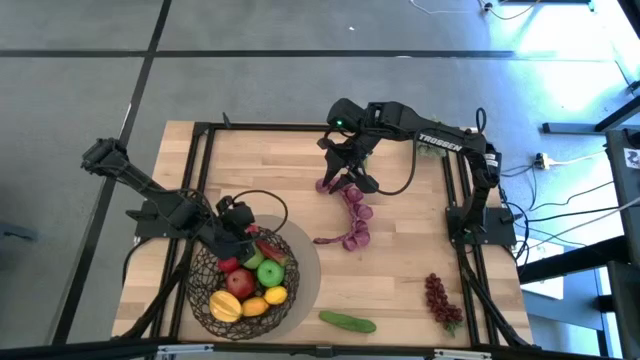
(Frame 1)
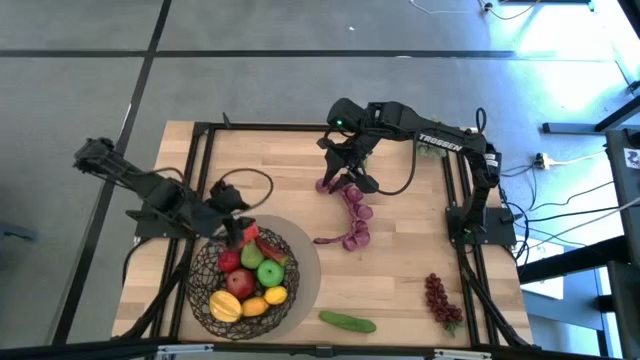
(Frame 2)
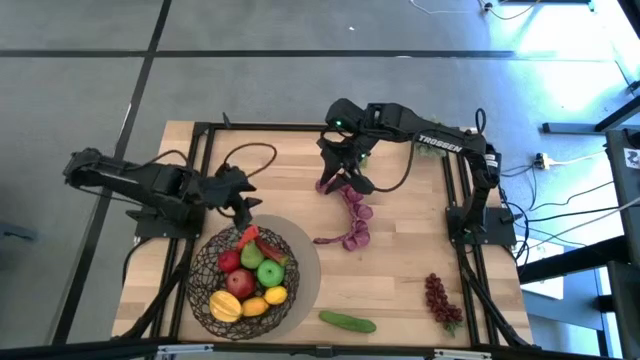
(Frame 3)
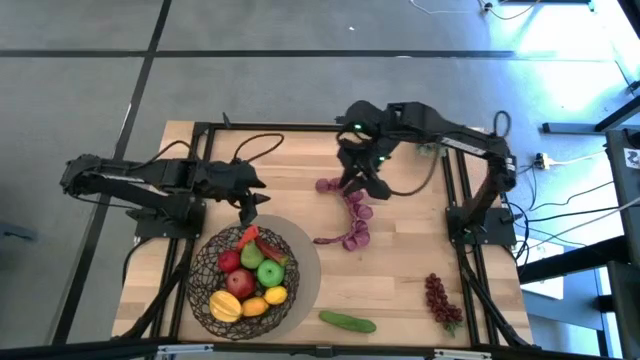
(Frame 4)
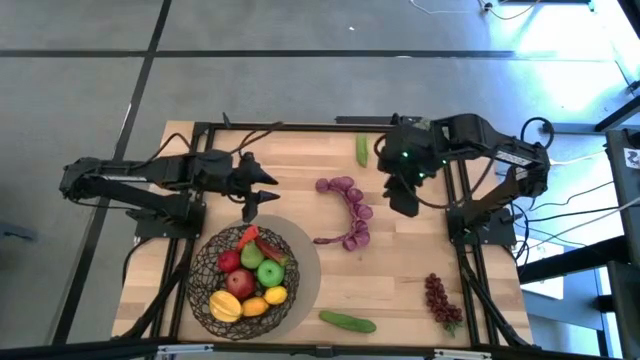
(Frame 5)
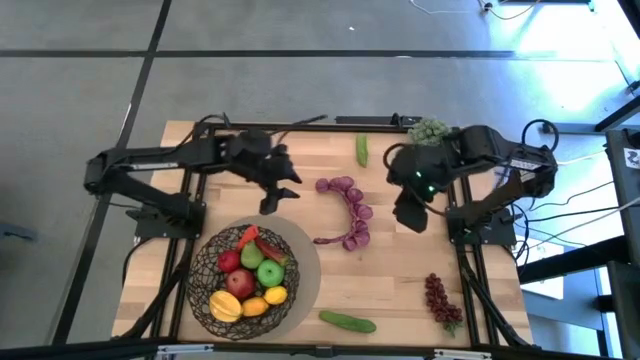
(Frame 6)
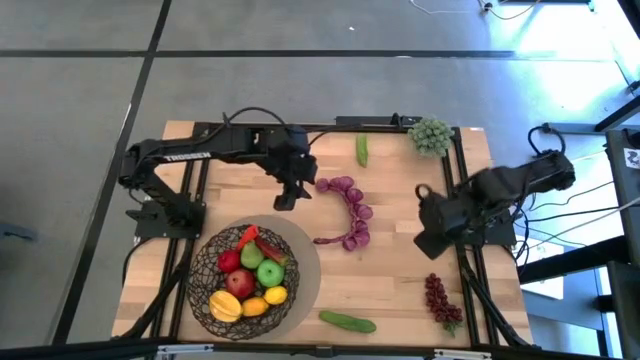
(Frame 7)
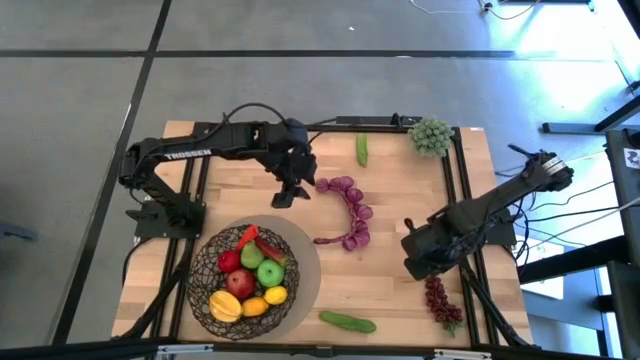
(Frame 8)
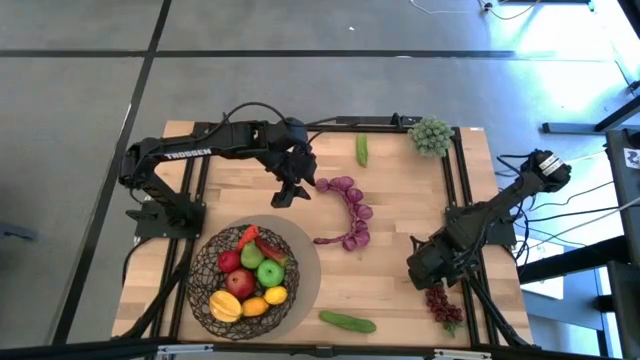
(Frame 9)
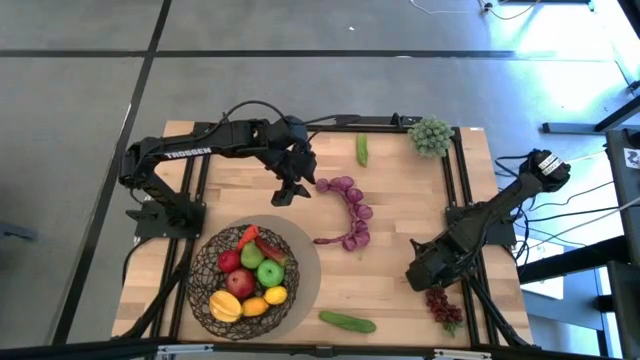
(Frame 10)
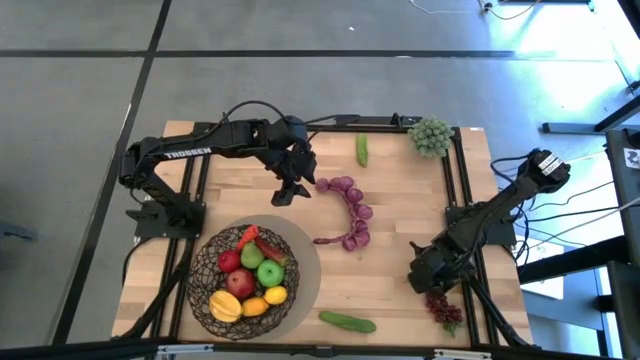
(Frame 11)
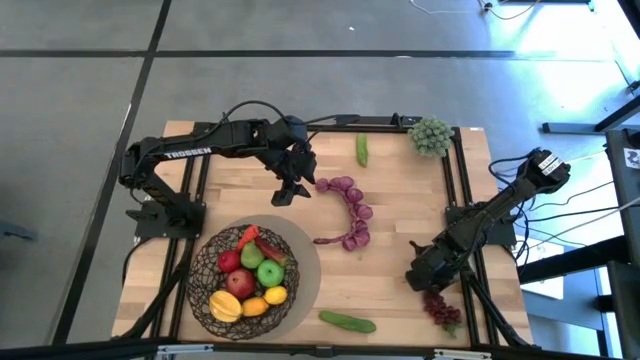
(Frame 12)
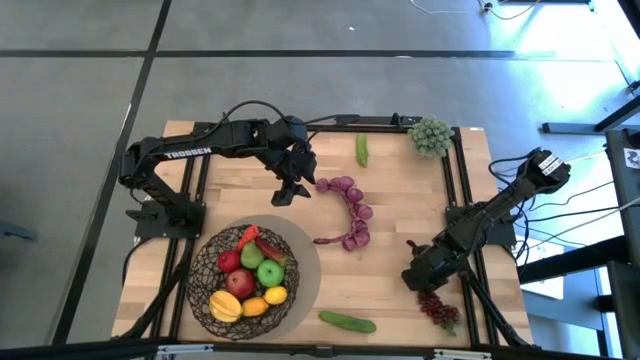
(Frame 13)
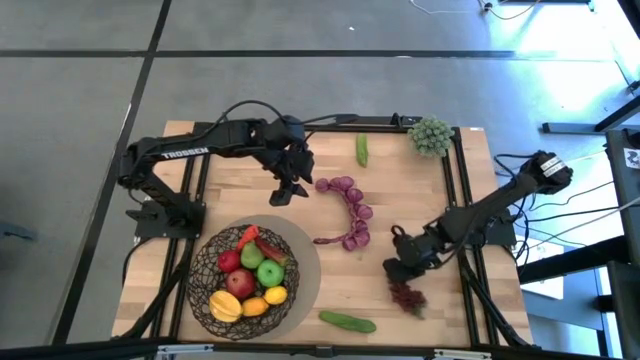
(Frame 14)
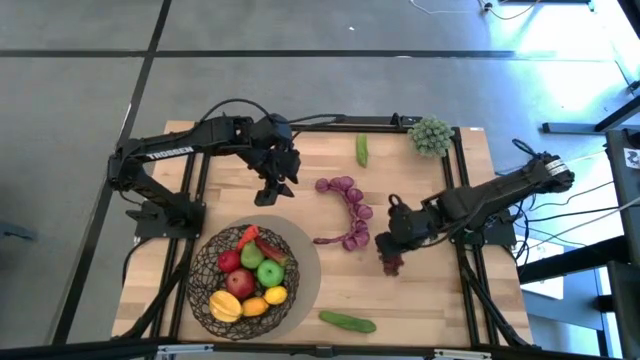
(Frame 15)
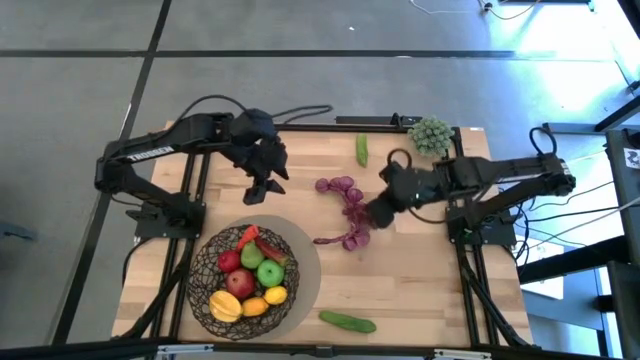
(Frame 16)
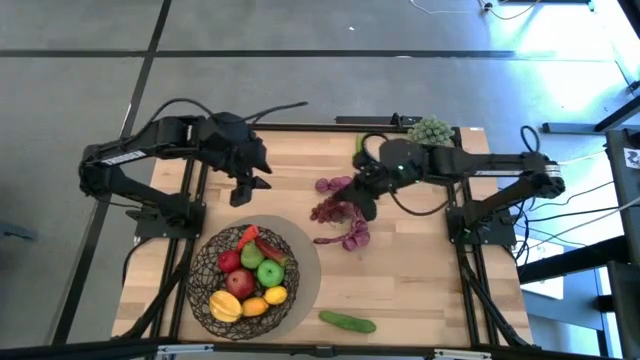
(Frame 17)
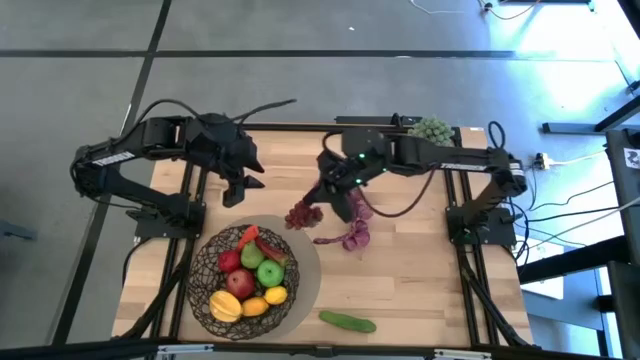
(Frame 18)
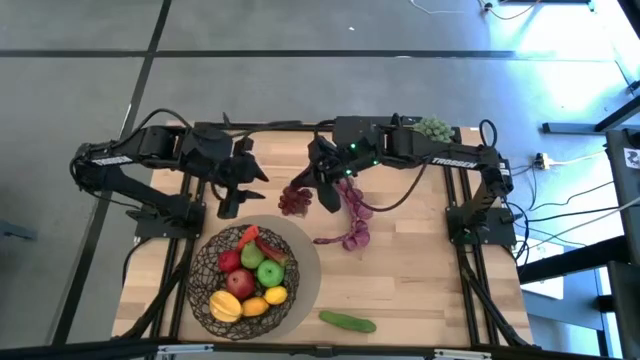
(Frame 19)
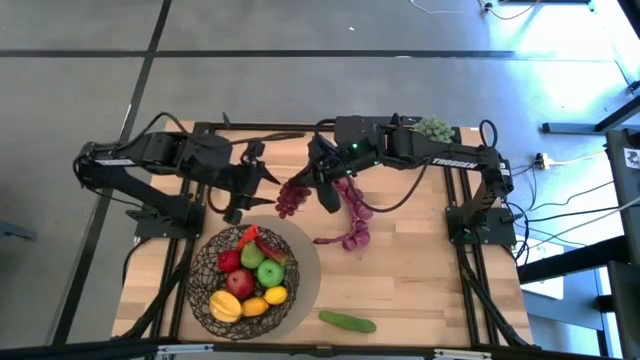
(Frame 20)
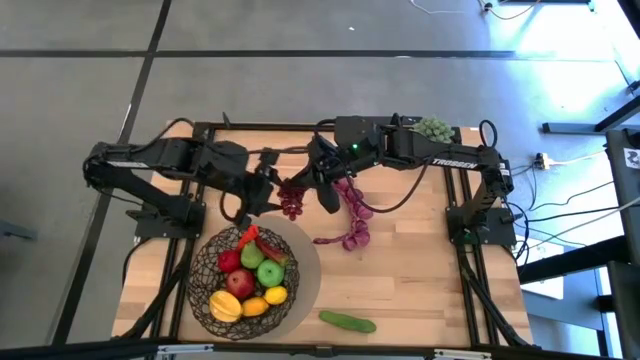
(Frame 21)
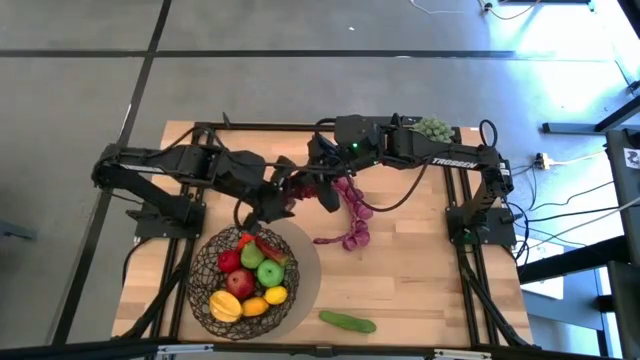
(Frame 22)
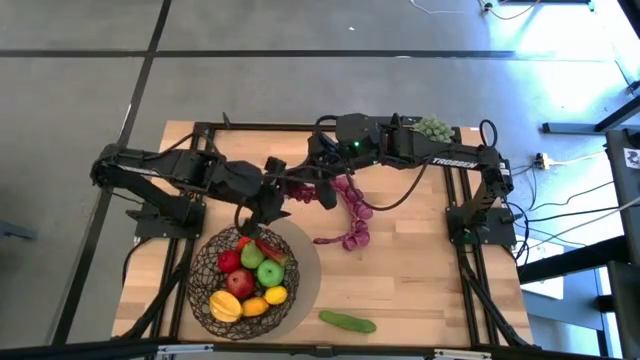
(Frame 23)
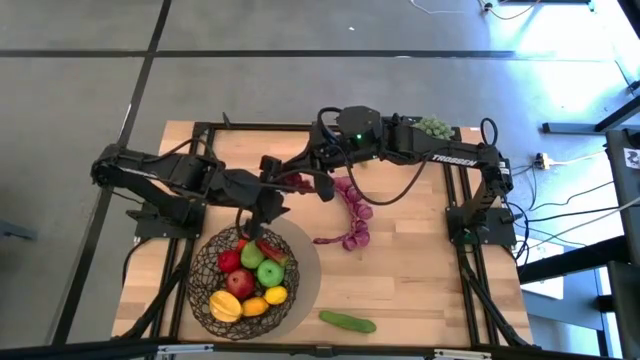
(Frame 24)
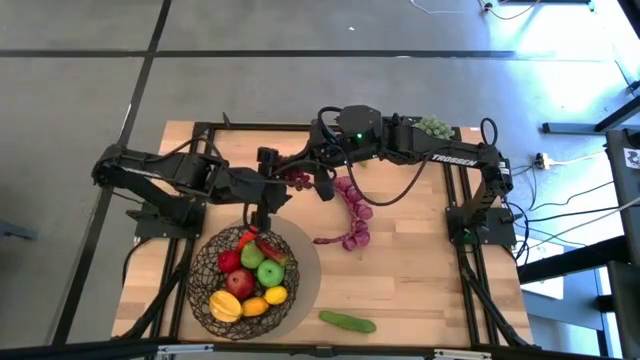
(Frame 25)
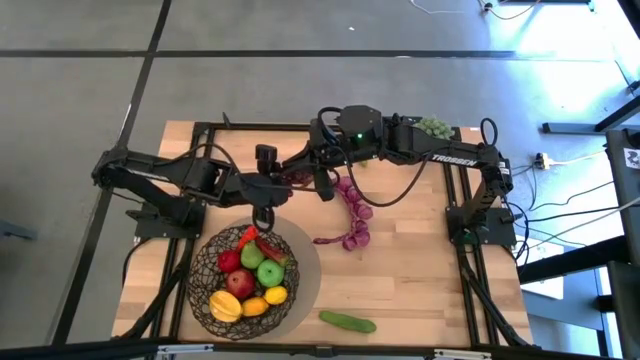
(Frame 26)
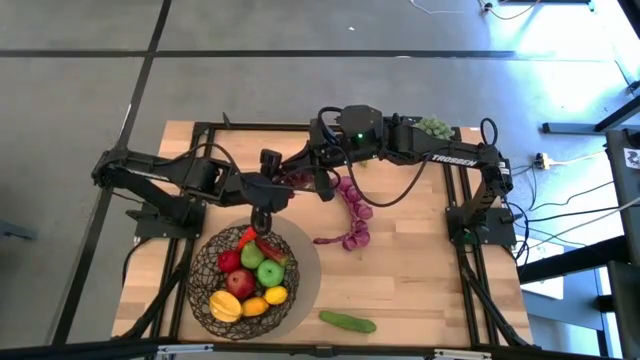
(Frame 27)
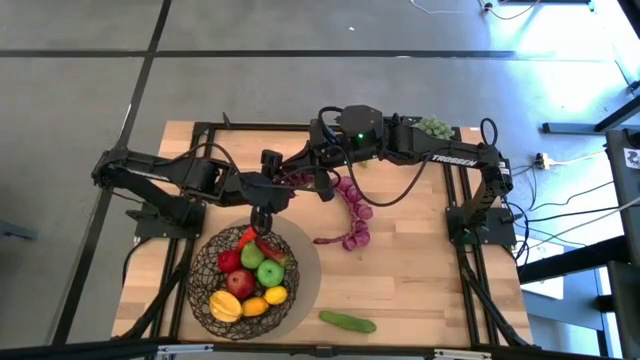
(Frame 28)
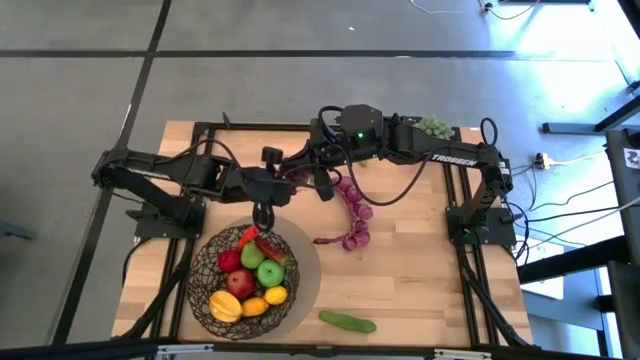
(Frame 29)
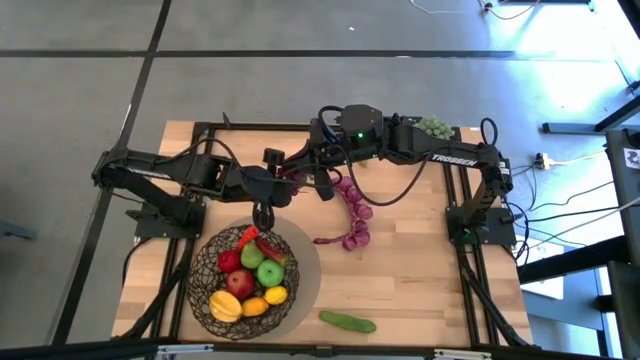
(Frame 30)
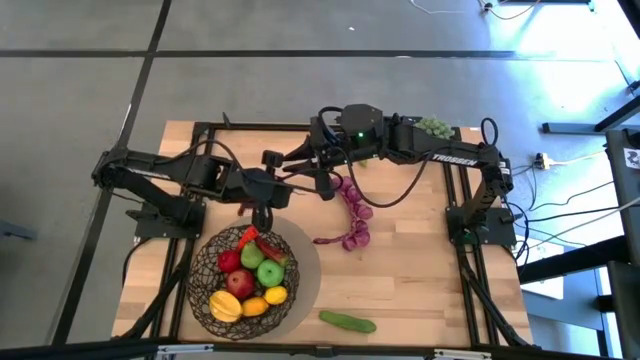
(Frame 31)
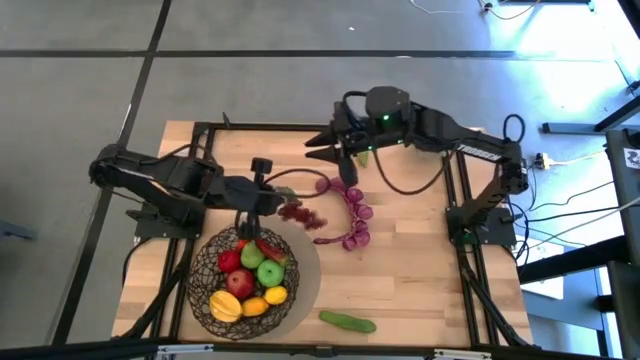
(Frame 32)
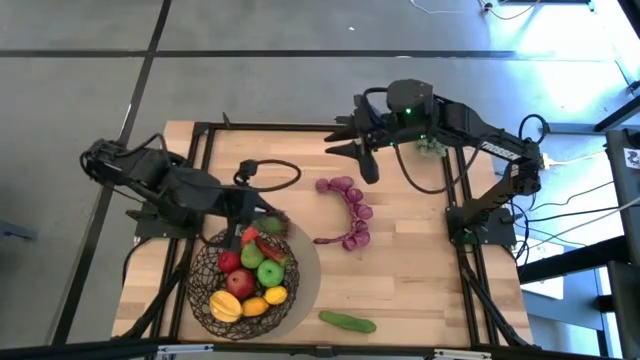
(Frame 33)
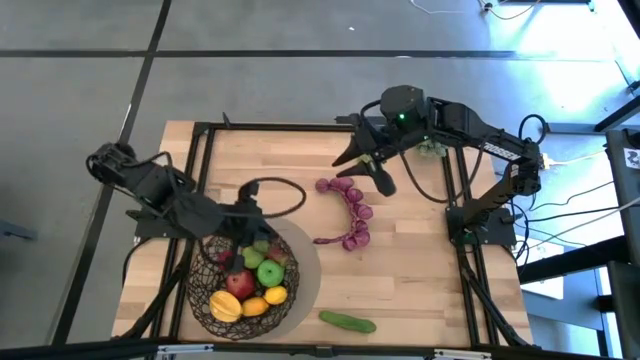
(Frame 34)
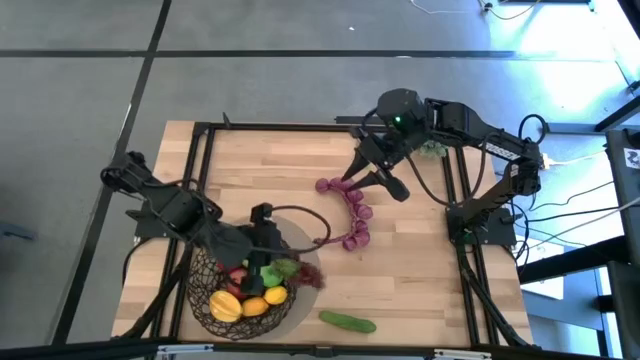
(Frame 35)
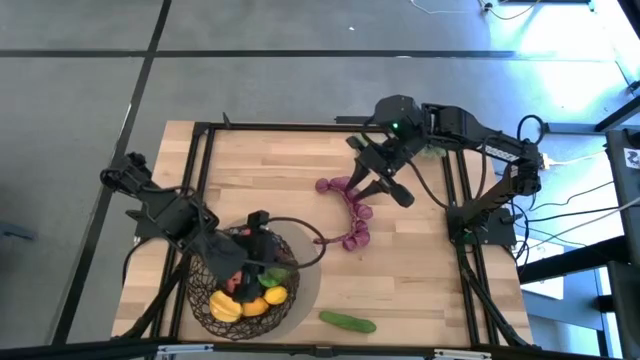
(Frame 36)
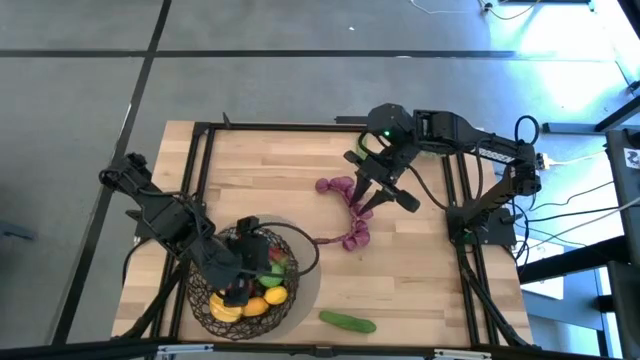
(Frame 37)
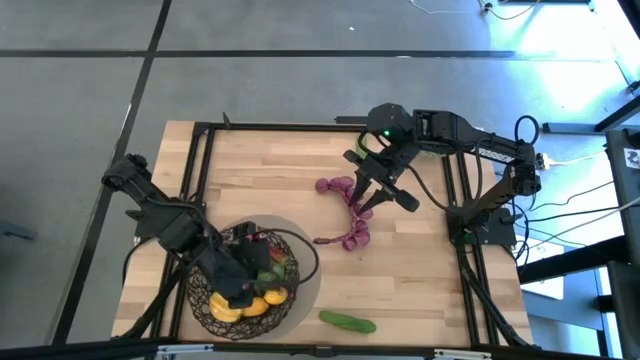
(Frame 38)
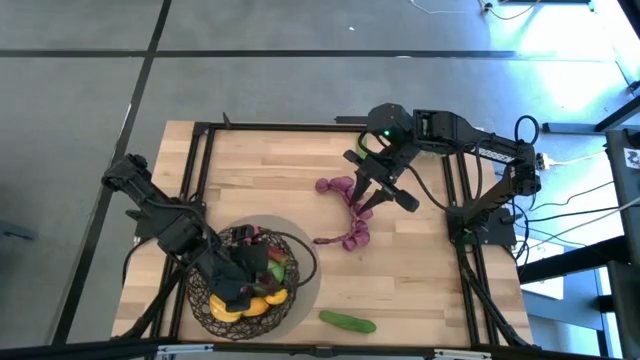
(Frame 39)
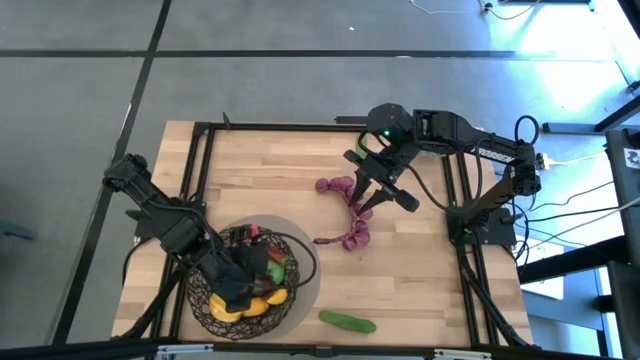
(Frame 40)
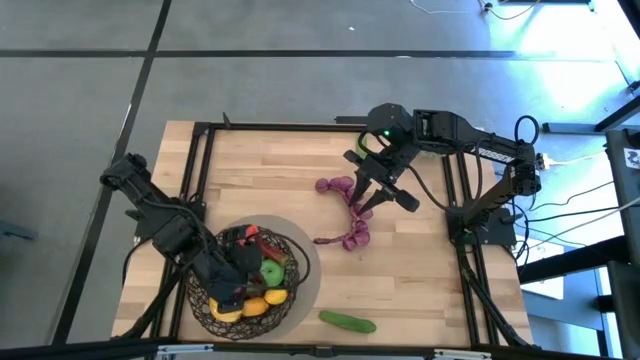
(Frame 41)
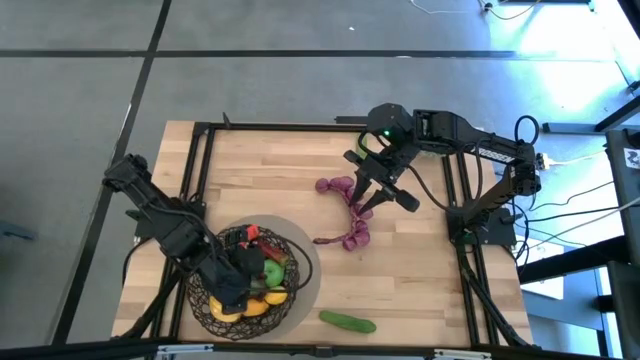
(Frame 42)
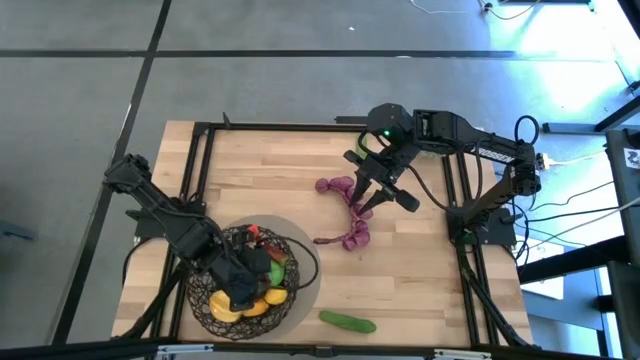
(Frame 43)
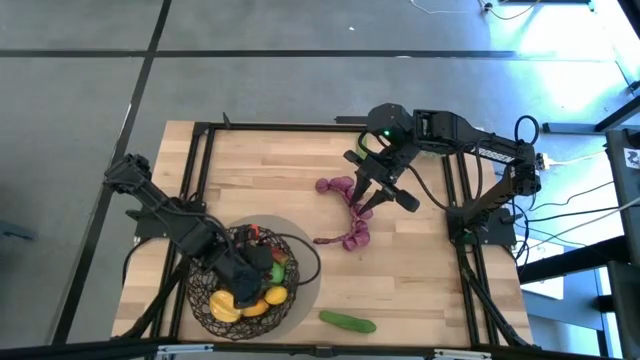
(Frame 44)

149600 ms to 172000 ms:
Task: Build produce basket
Put the red grapes into the black wire basket
